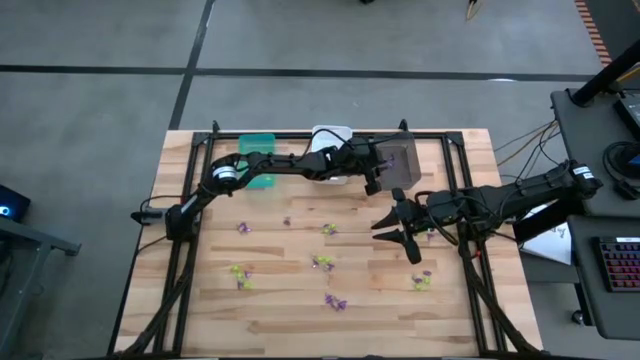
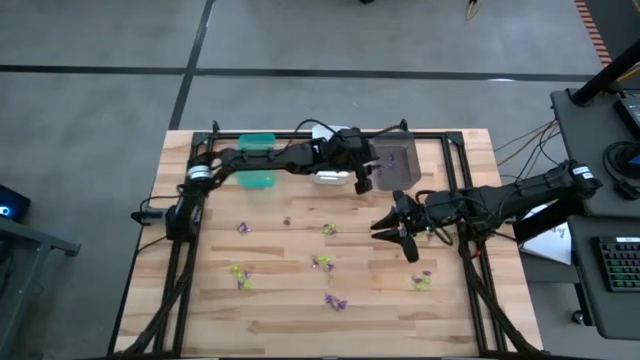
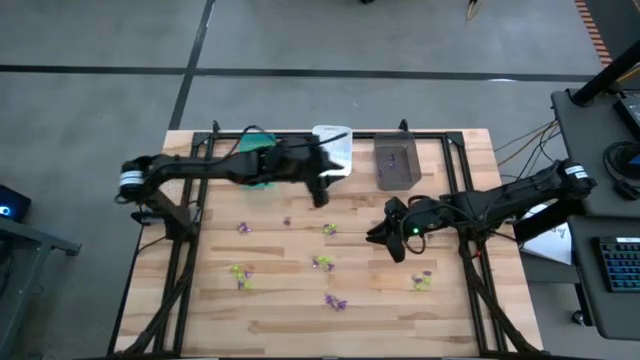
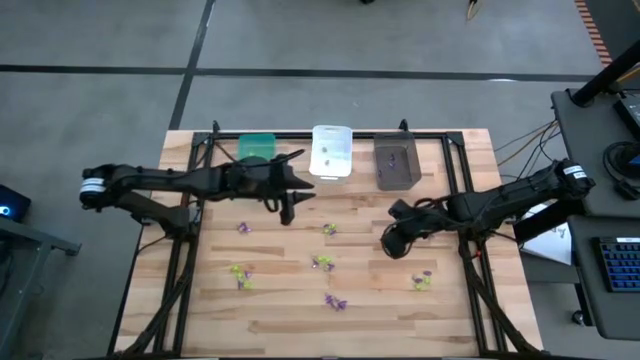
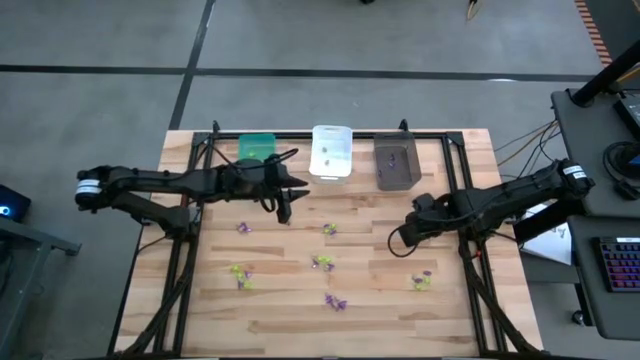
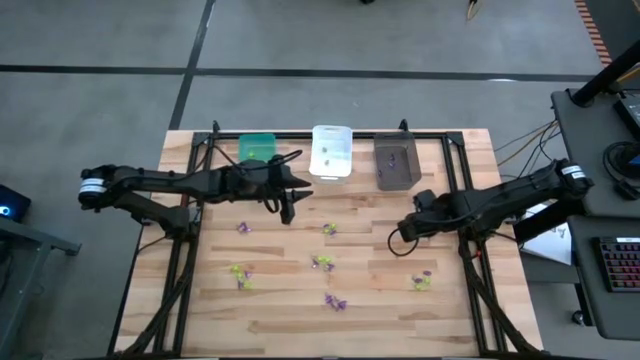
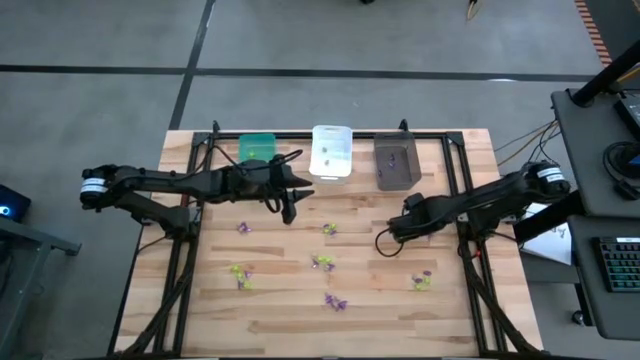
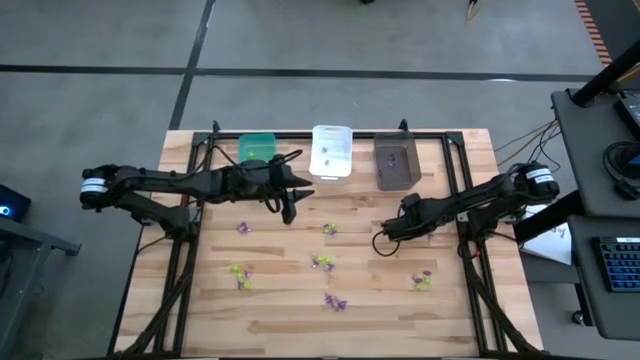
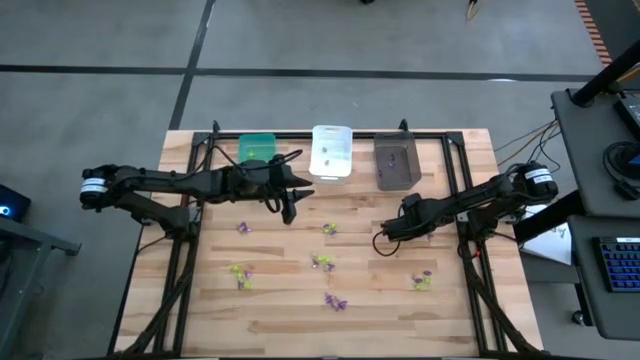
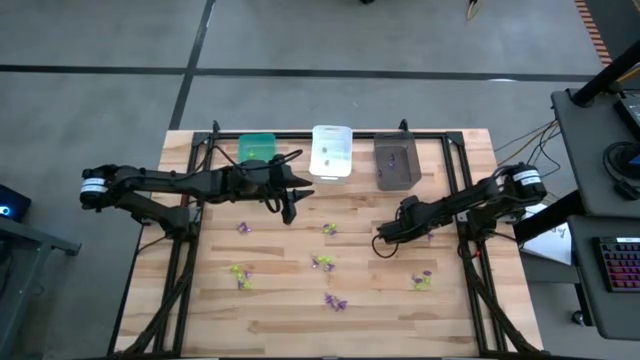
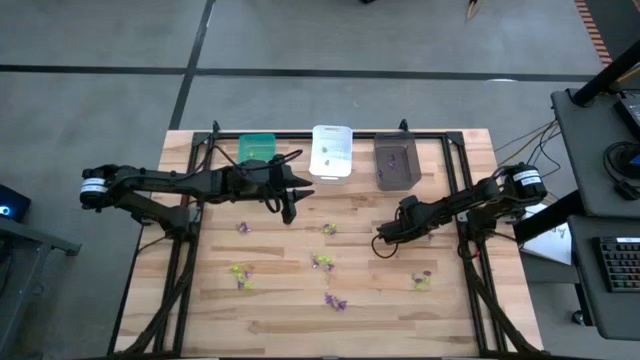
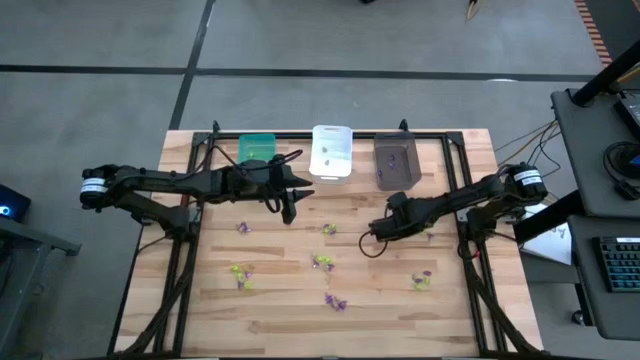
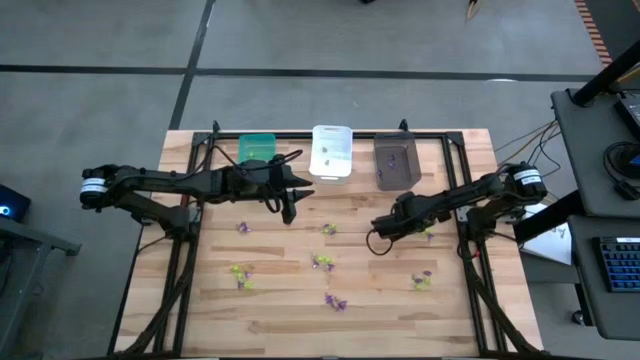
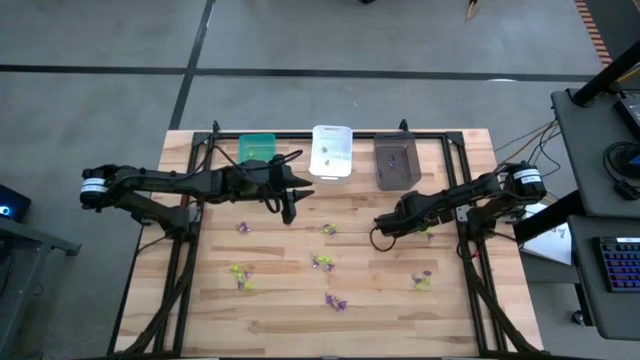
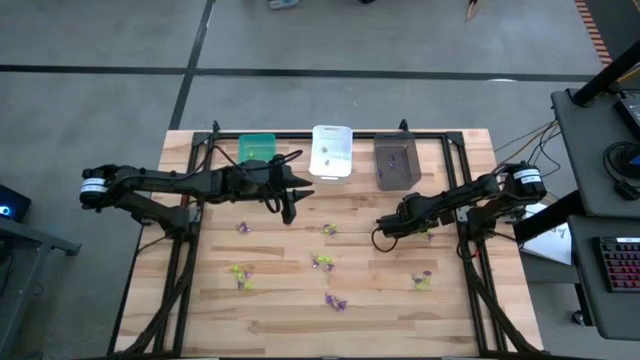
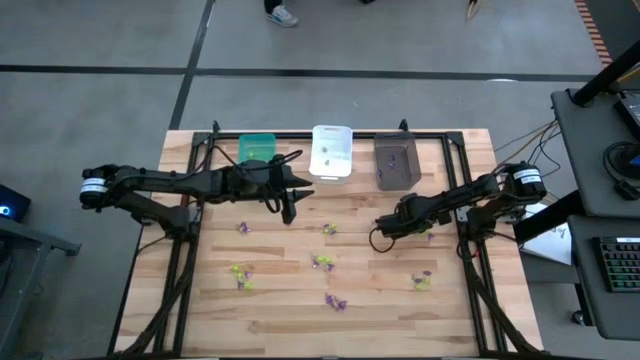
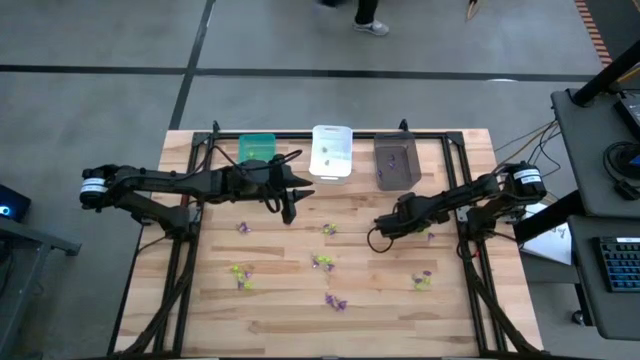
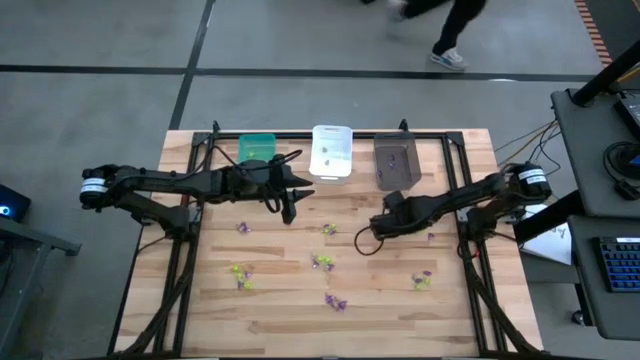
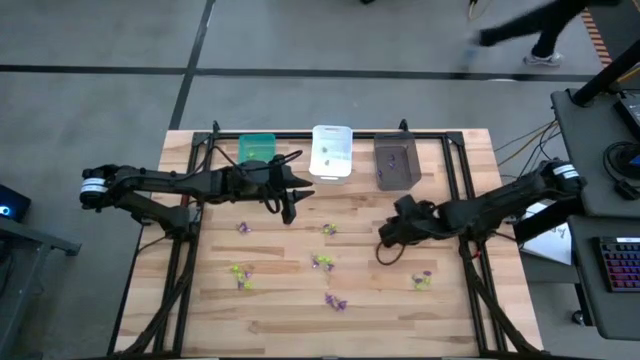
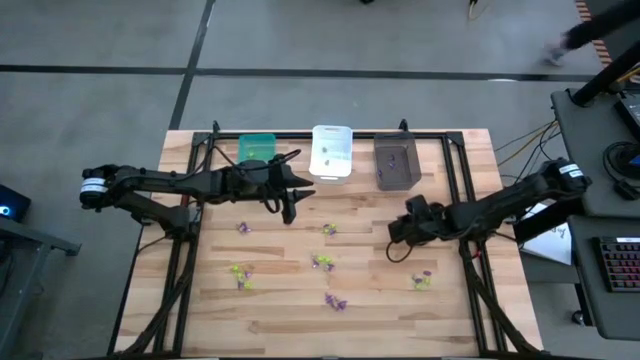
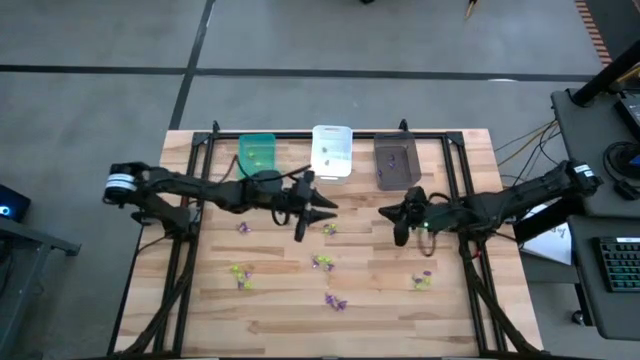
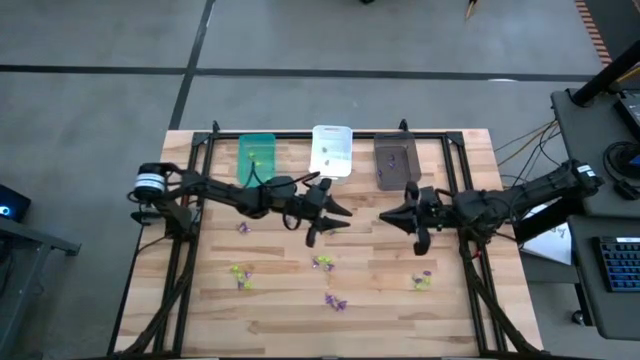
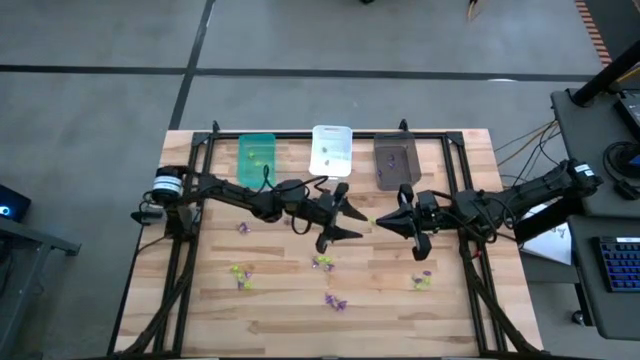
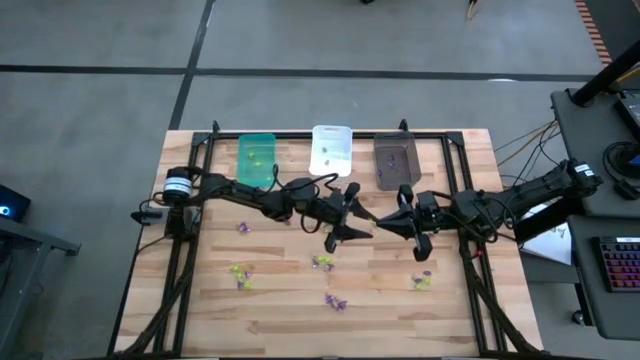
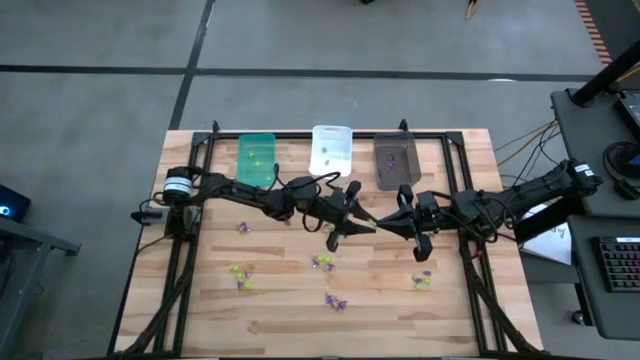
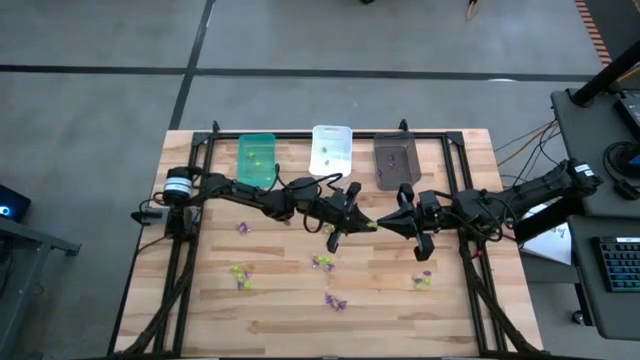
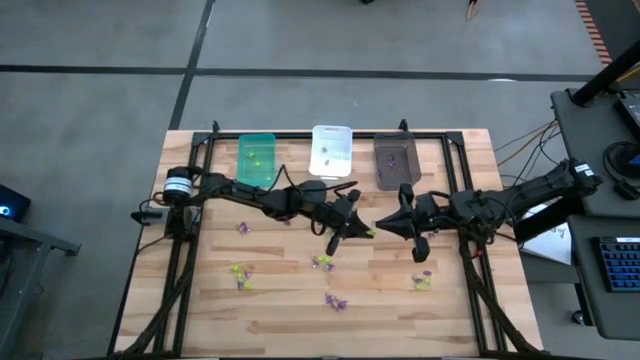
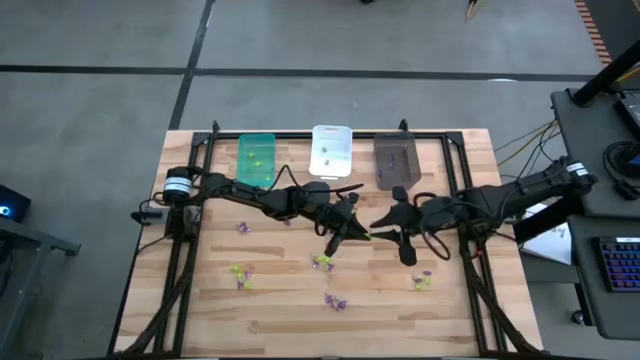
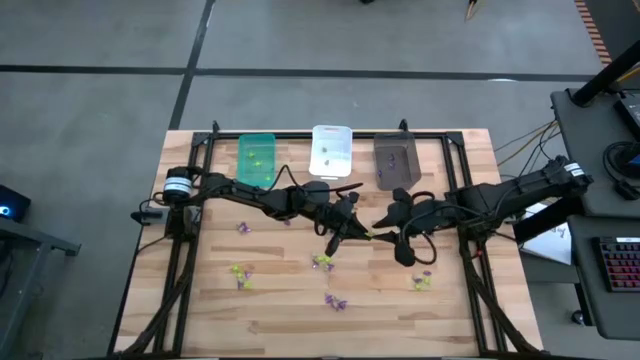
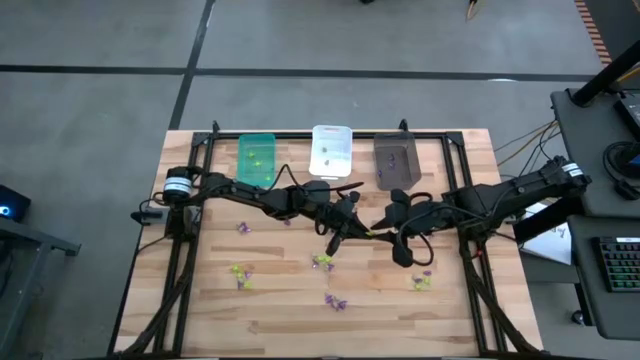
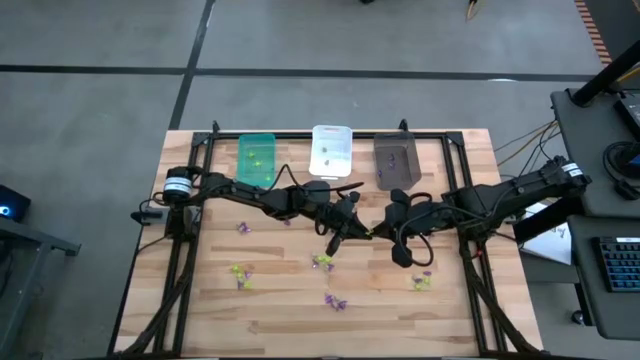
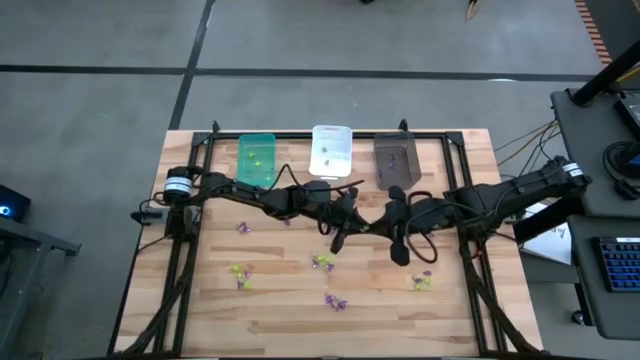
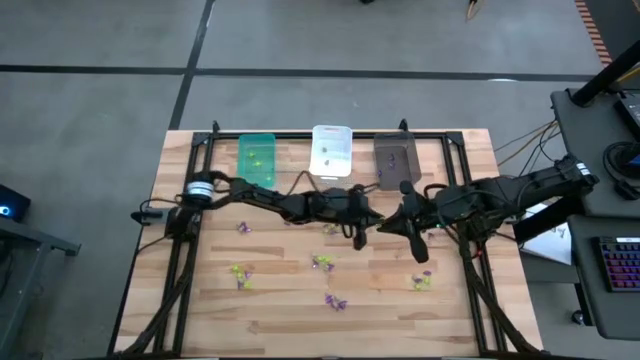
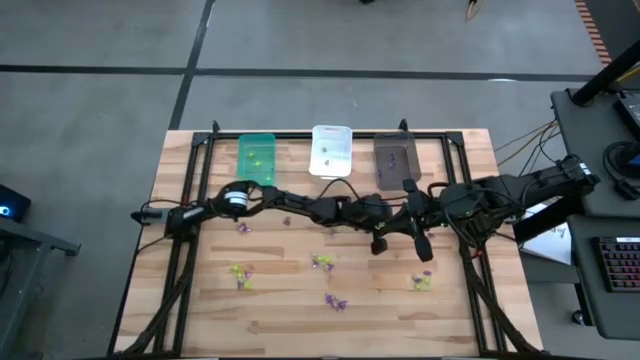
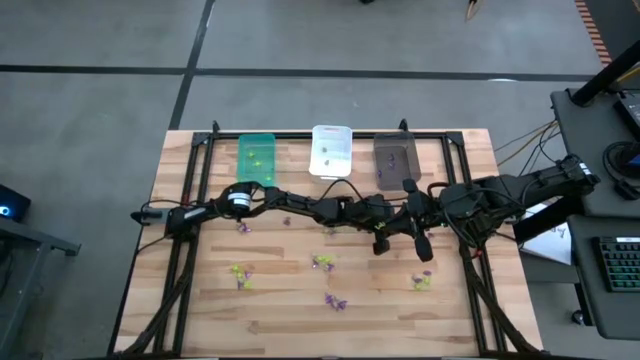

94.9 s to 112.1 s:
Task: Sort Halloween decoration
Put the green spider toy into the blue bin

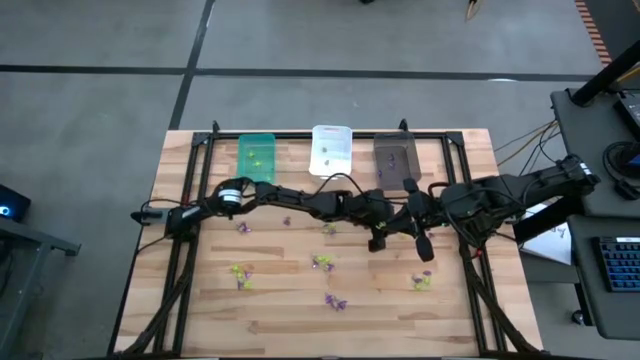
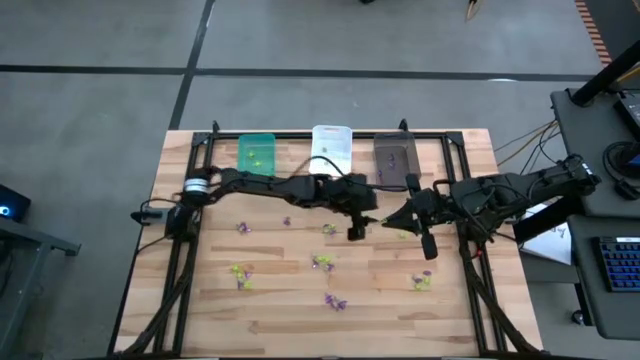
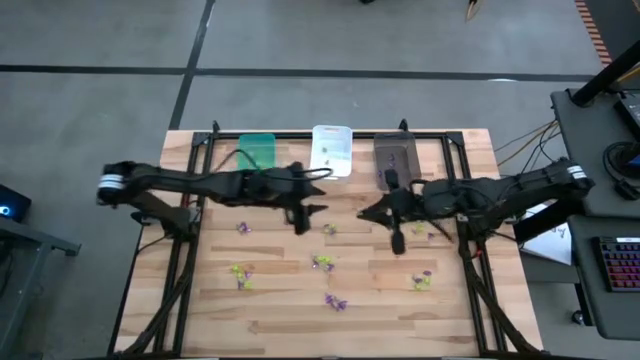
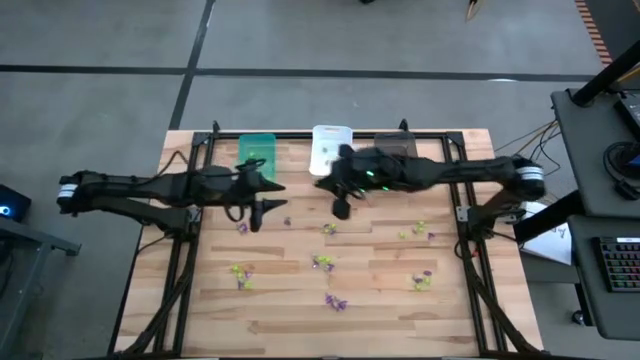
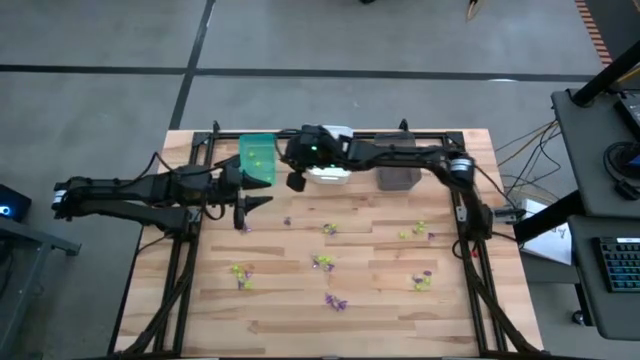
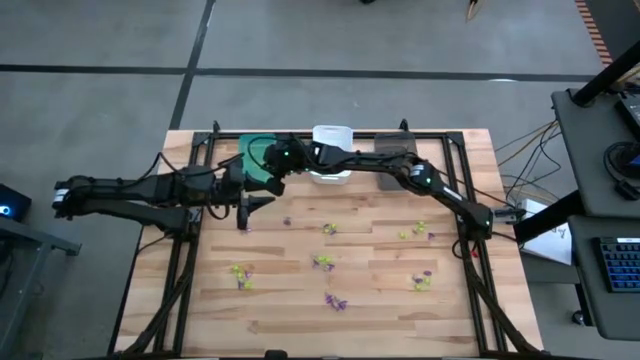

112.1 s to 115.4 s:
Put the green spider toy into the blue bin
